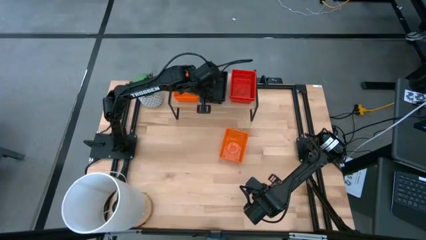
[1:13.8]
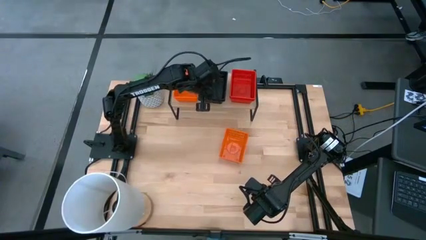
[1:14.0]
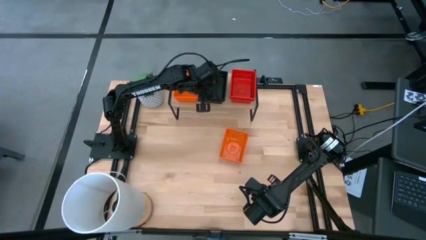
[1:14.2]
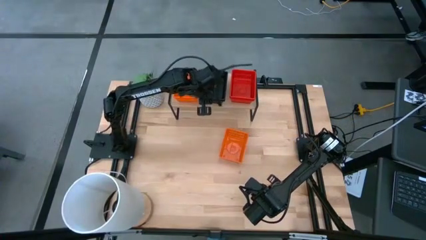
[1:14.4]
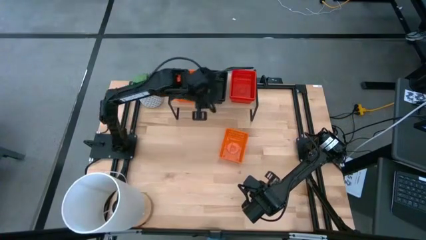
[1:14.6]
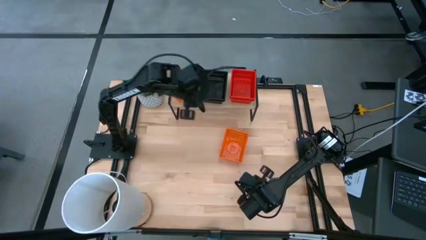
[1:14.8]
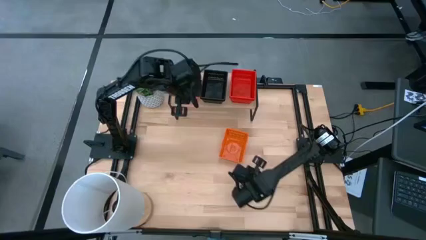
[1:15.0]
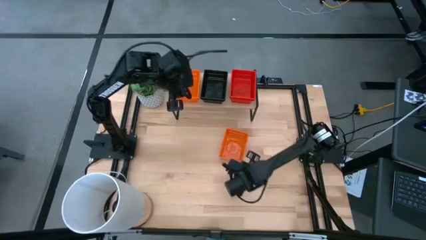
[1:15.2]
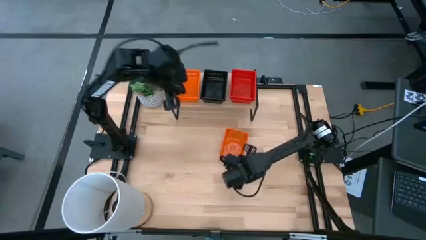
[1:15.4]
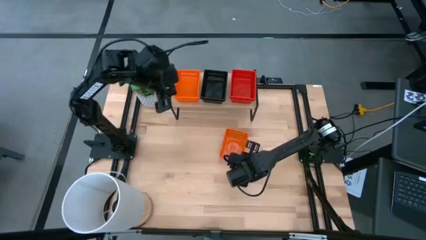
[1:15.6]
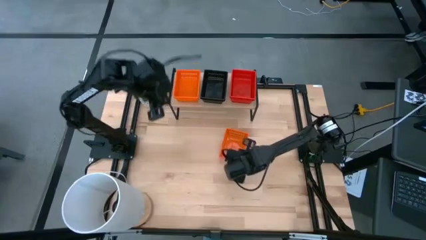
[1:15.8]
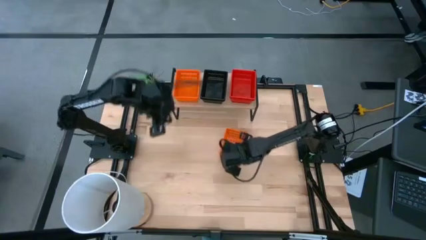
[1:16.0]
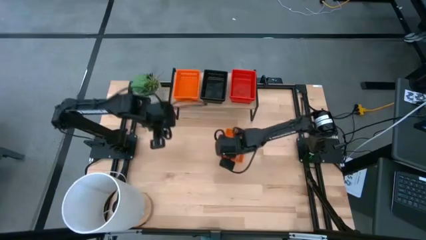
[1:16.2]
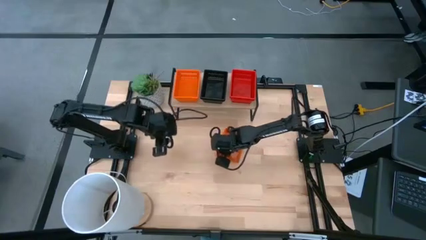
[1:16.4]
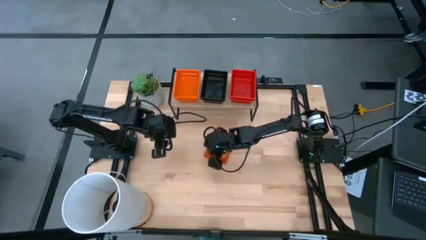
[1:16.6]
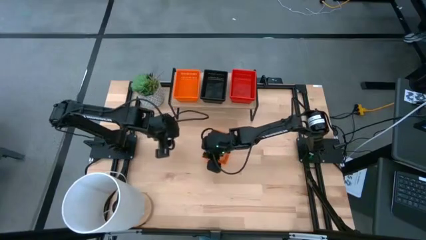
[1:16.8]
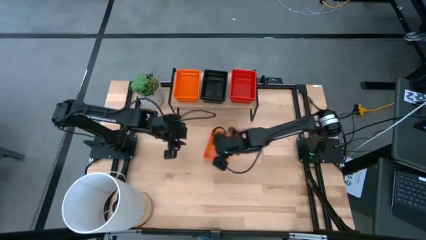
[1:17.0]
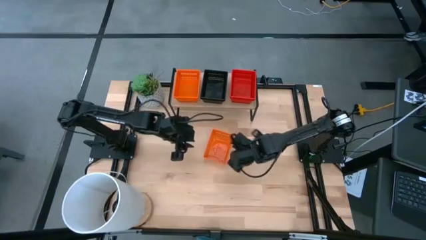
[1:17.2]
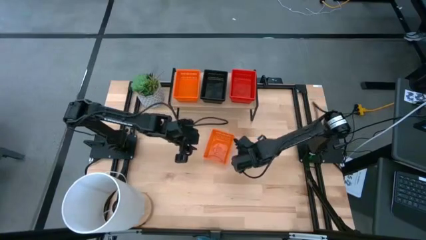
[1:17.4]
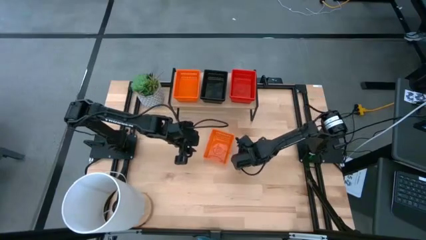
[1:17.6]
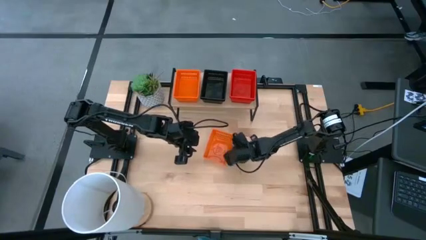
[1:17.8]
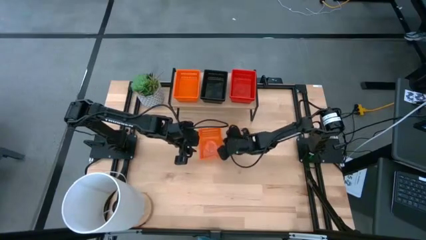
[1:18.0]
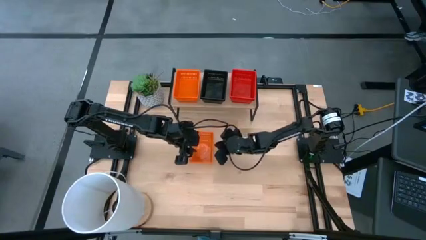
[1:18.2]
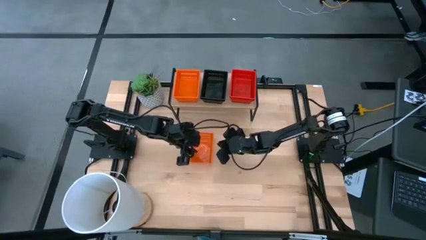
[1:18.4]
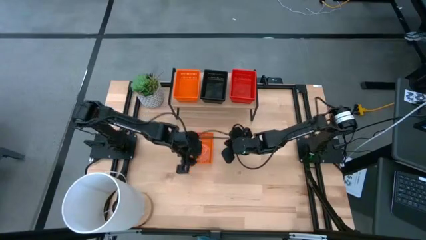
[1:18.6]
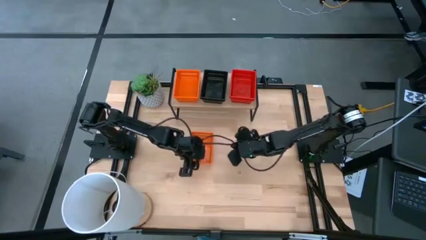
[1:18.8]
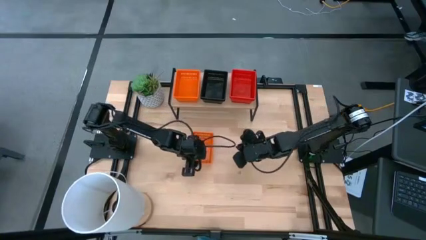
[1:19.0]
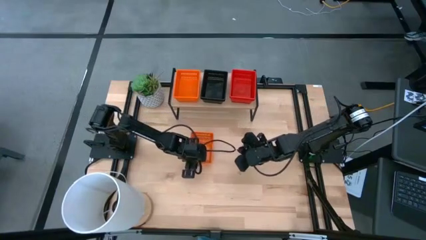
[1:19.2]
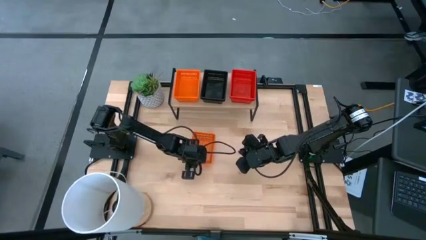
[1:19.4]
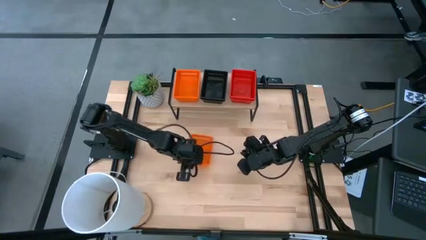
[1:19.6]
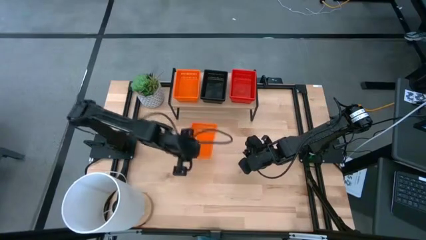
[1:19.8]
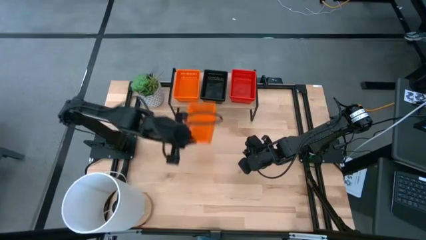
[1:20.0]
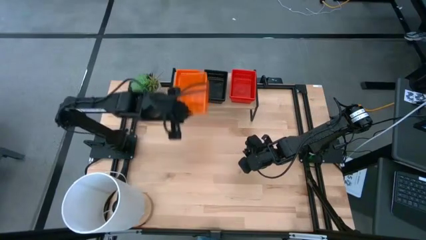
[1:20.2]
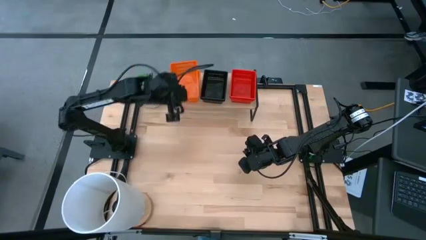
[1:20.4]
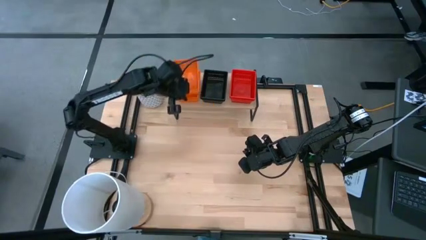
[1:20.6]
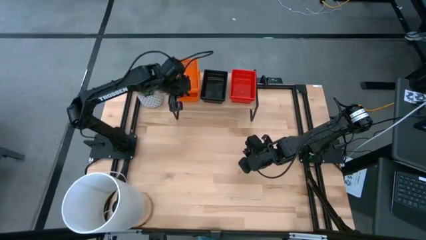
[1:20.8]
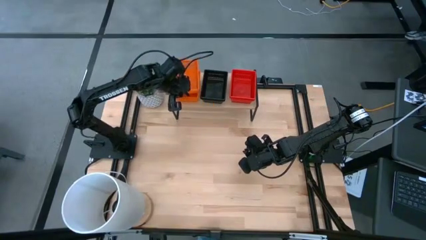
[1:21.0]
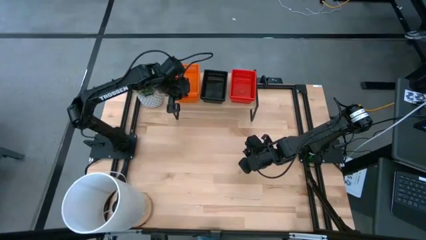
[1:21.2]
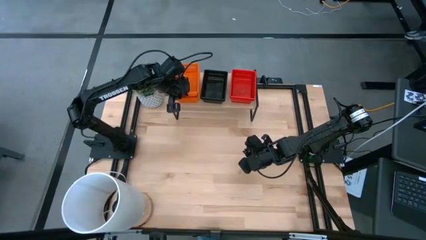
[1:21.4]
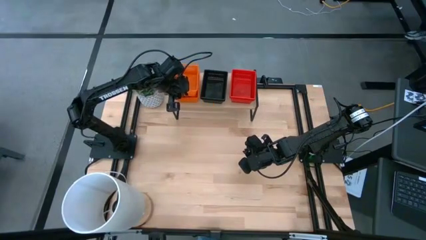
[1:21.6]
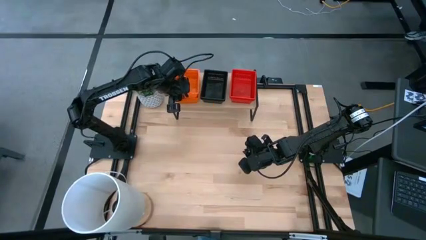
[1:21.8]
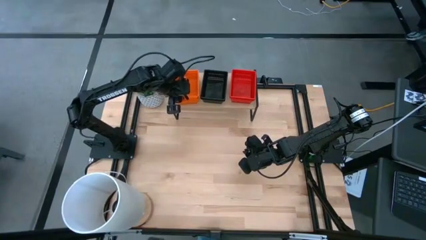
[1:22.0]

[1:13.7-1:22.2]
Task: Stack baskets on shelf by color
Stack the orange bin on top of the orange bin on the shelf

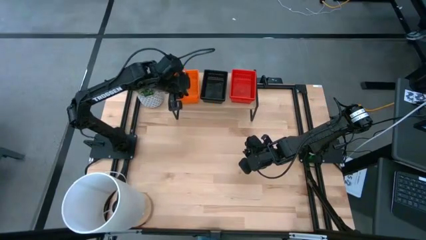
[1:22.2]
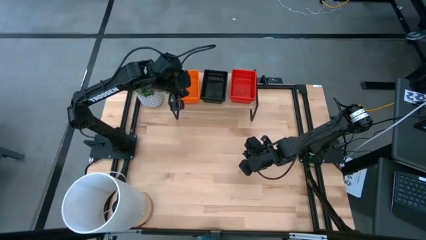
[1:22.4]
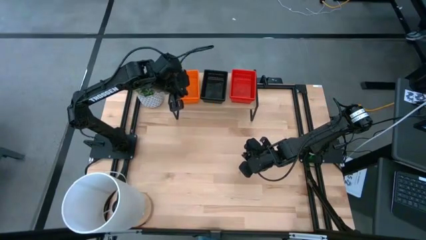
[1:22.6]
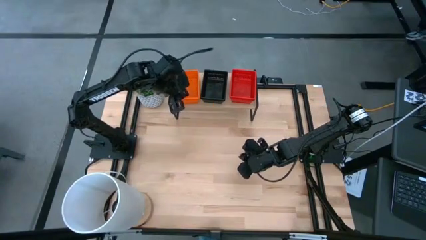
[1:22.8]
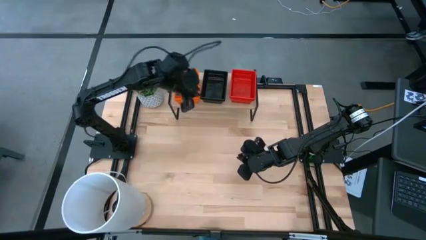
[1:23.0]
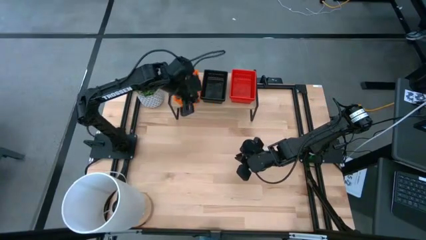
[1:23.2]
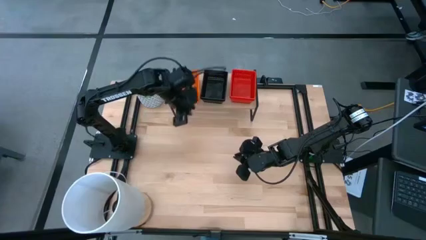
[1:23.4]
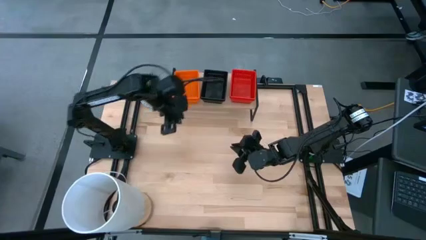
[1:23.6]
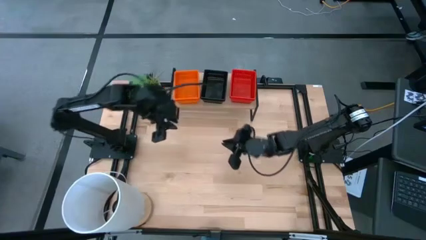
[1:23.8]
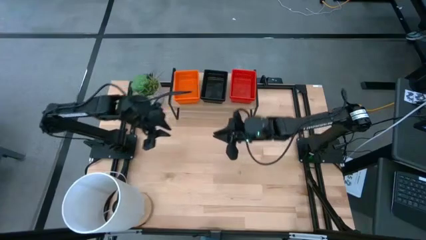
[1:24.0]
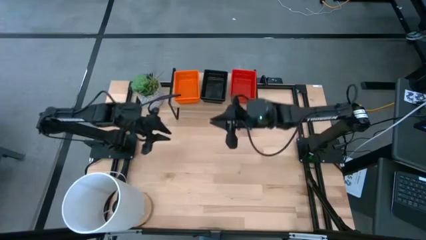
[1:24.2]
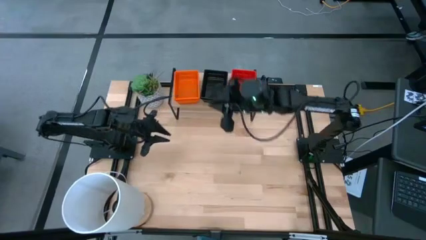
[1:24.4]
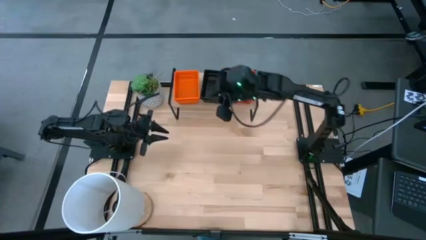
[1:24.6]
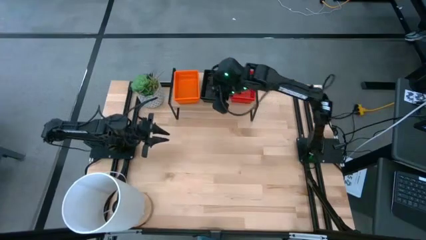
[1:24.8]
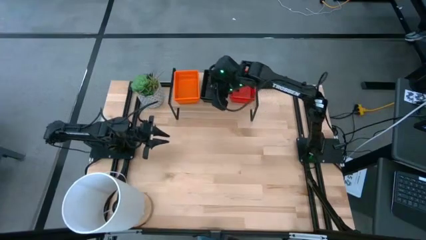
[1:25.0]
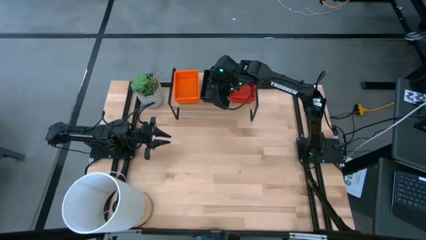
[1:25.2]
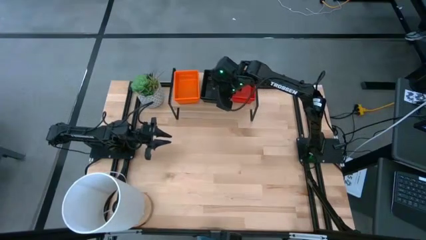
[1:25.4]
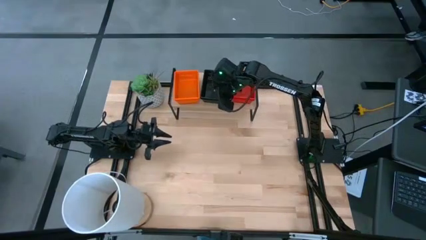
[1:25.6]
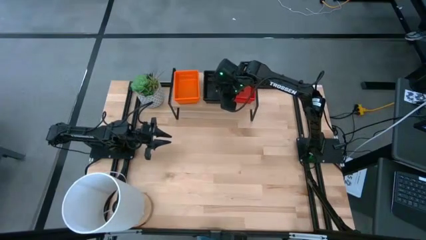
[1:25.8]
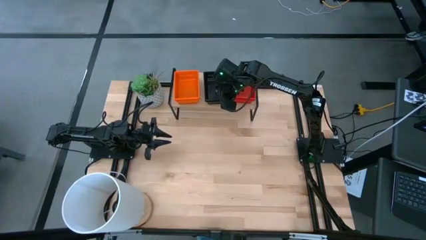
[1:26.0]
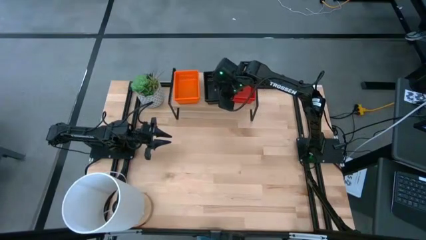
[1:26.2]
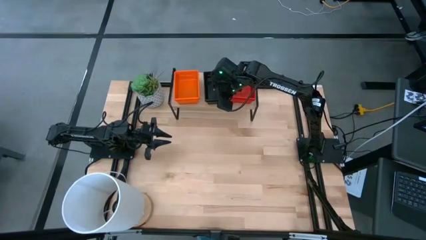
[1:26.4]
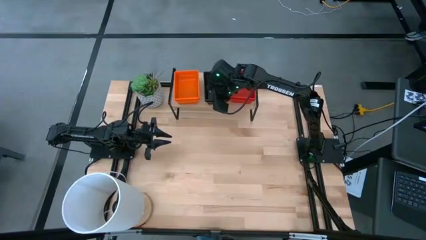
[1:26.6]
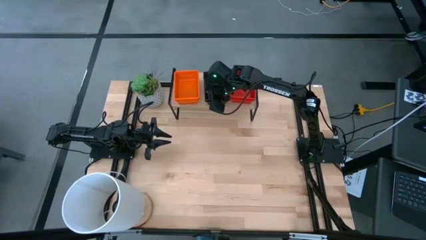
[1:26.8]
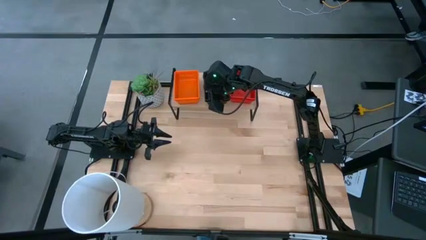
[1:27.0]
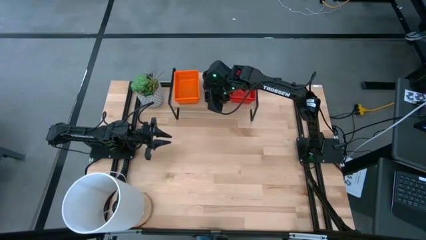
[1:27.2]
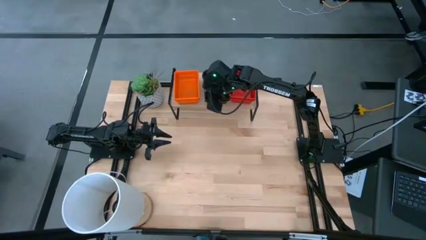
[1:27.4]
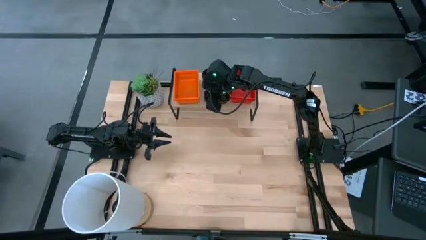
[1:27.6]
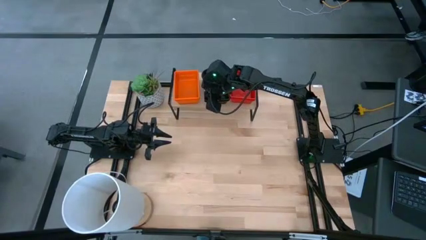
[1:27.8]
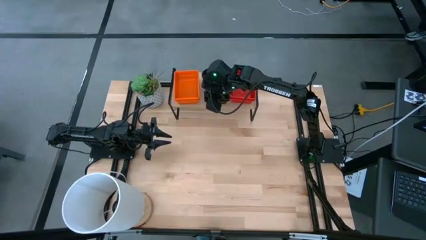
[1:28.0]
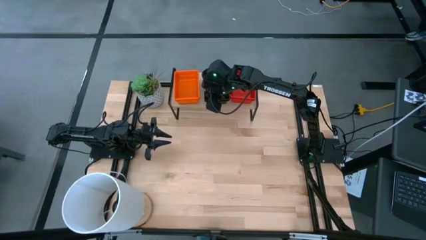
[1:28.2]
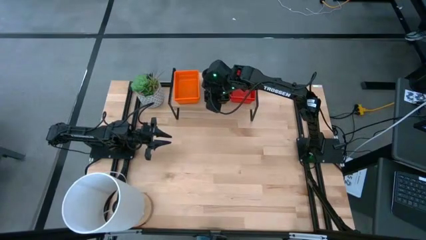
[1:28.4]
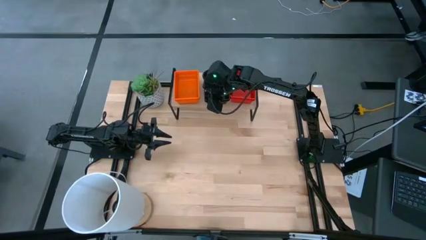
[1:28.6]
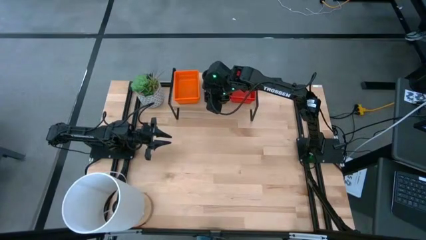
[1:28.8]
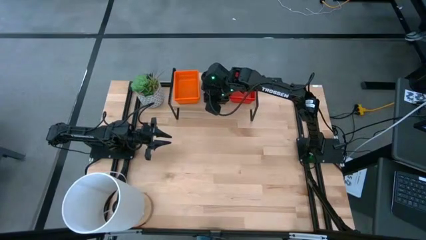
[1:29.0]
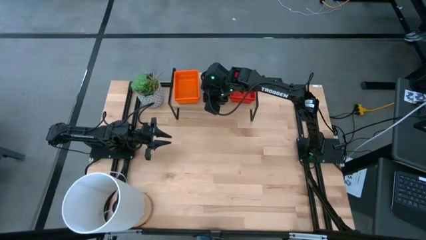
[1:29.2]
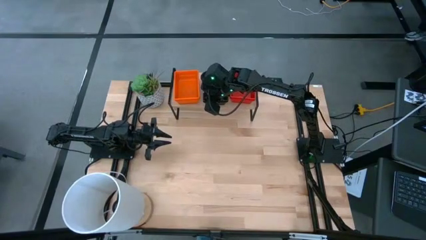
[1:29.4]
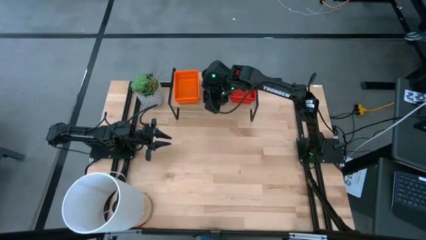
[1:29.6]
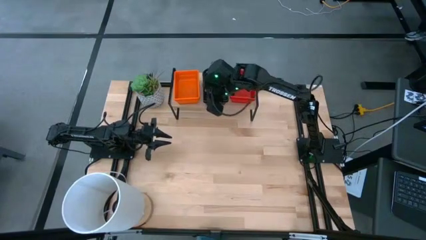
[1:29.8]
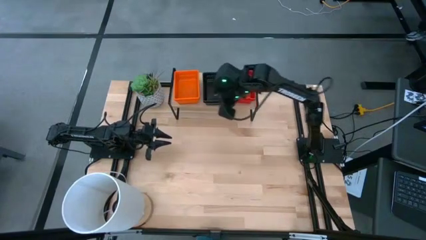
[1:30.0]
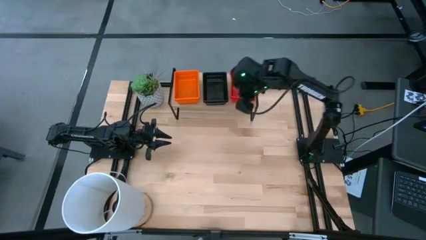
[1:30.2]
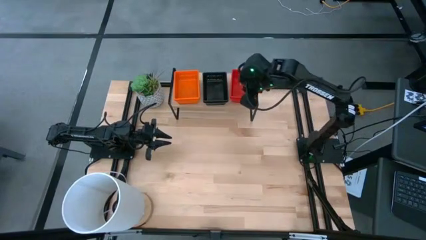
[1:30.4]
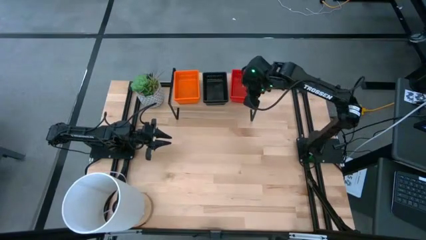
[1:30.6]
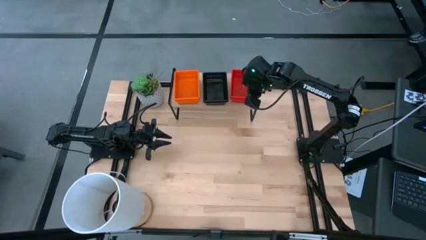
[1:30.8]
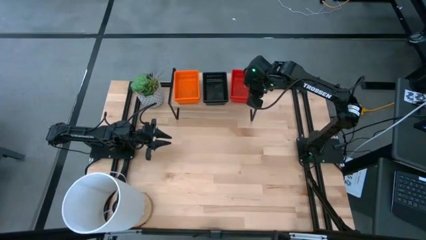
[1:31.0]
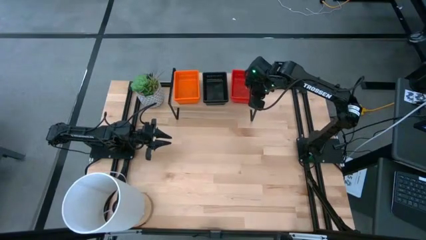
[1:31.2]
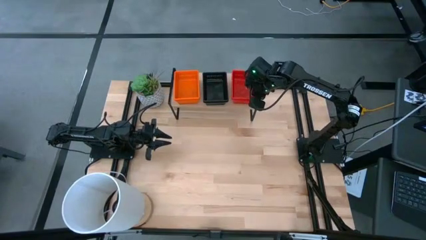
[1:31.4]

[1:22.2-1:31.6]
Adjust the stacked bins on the shelf
